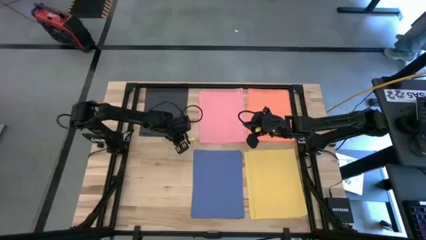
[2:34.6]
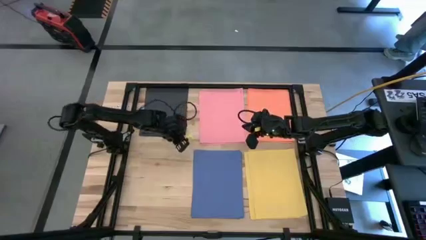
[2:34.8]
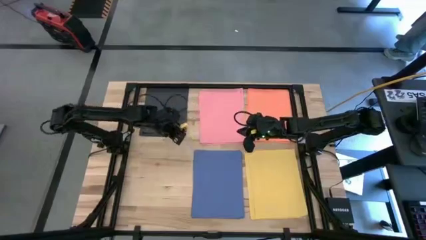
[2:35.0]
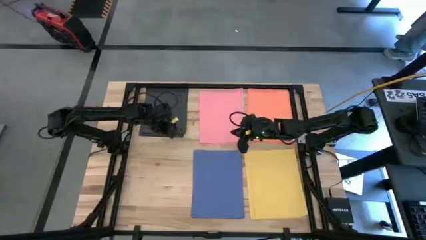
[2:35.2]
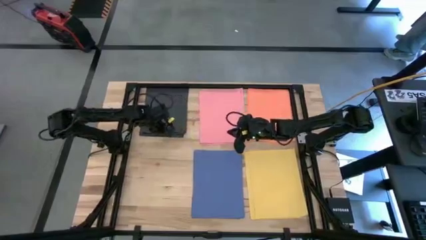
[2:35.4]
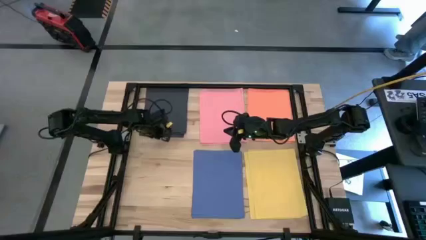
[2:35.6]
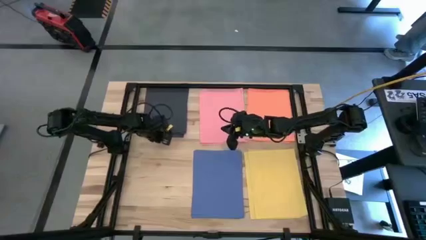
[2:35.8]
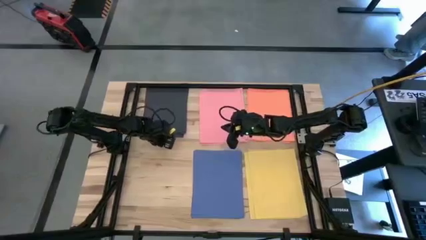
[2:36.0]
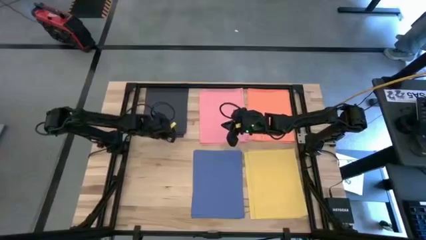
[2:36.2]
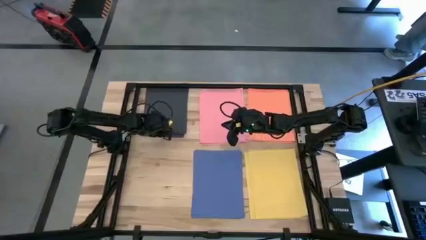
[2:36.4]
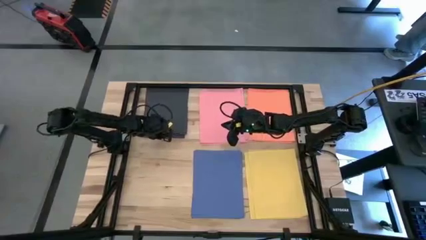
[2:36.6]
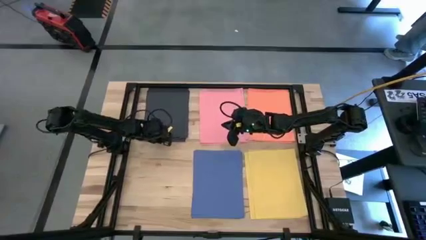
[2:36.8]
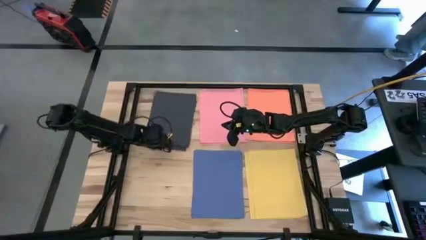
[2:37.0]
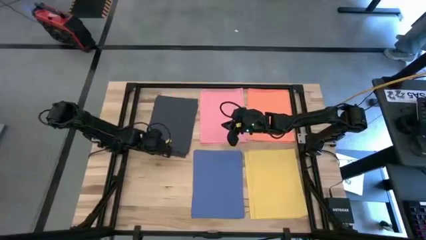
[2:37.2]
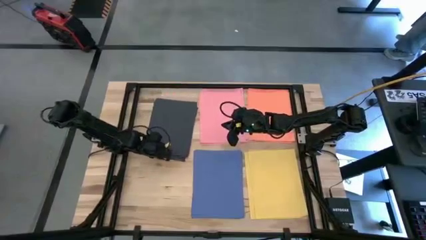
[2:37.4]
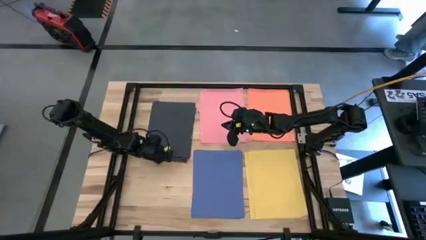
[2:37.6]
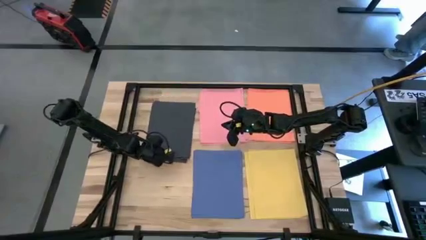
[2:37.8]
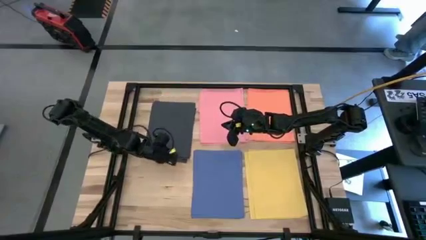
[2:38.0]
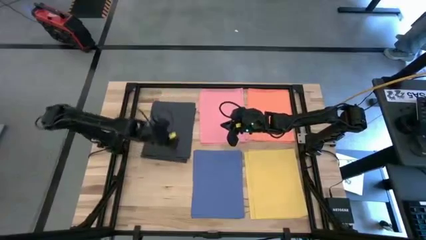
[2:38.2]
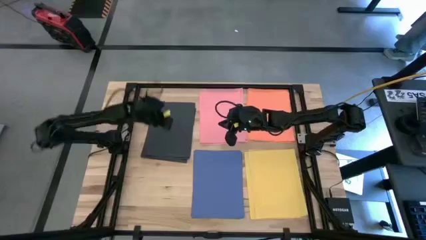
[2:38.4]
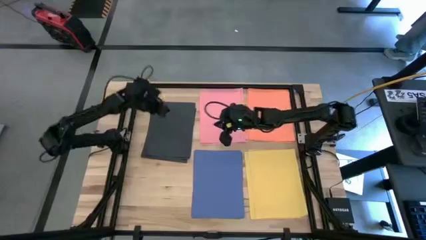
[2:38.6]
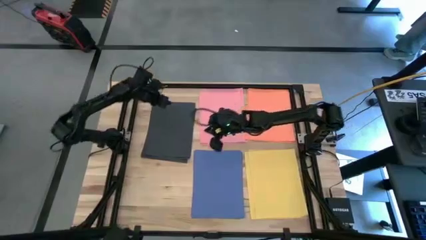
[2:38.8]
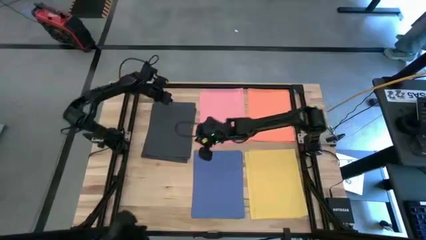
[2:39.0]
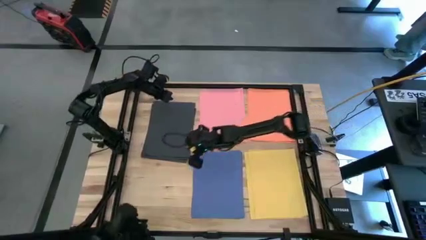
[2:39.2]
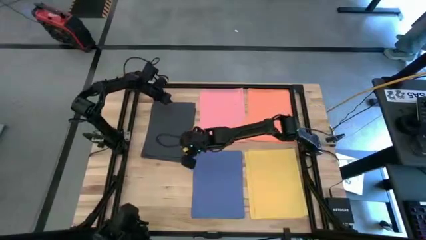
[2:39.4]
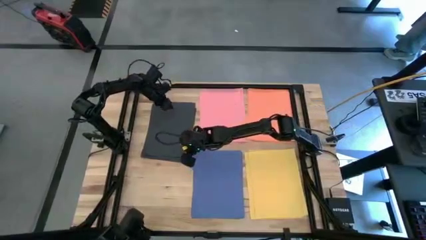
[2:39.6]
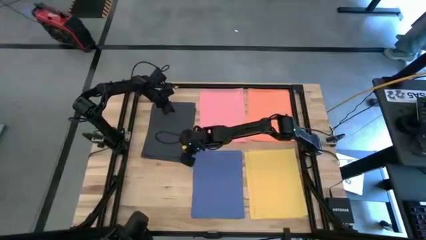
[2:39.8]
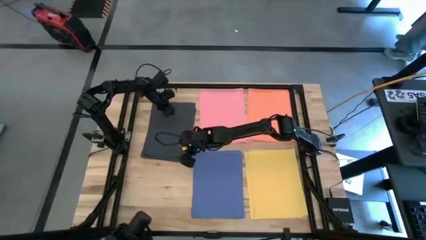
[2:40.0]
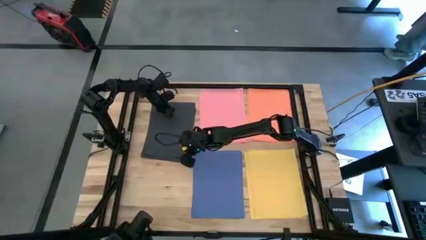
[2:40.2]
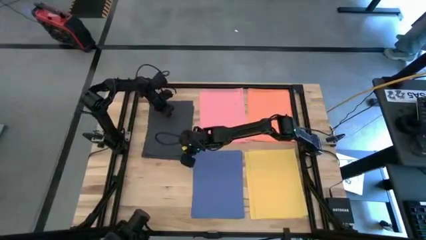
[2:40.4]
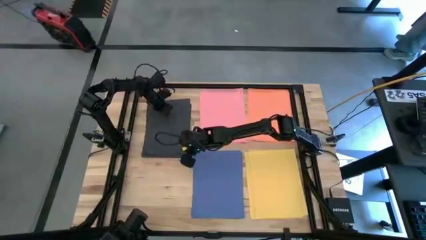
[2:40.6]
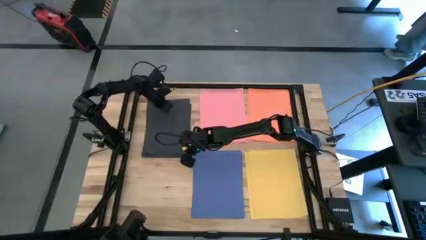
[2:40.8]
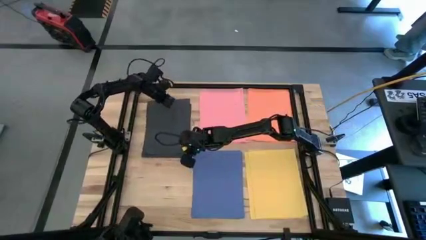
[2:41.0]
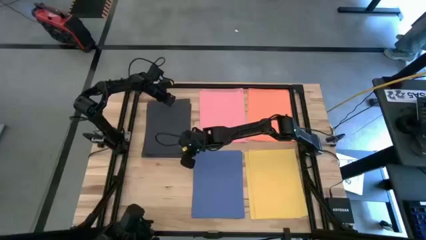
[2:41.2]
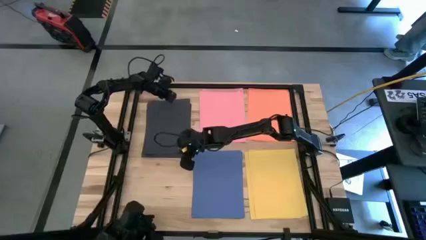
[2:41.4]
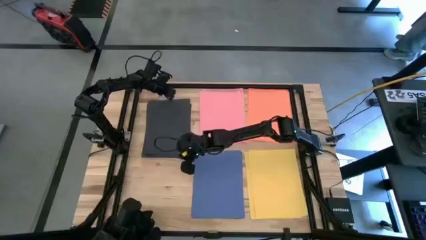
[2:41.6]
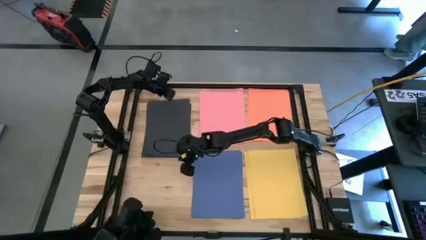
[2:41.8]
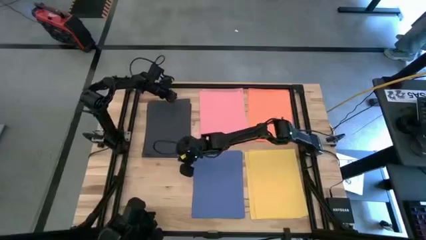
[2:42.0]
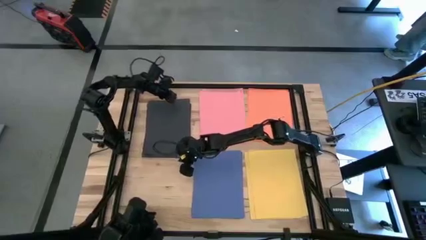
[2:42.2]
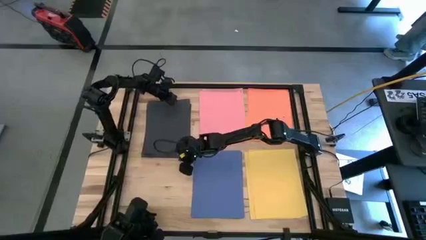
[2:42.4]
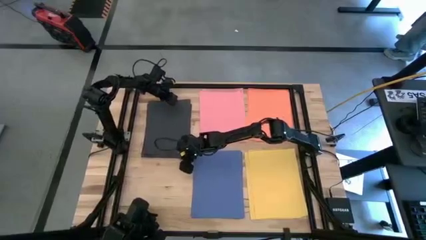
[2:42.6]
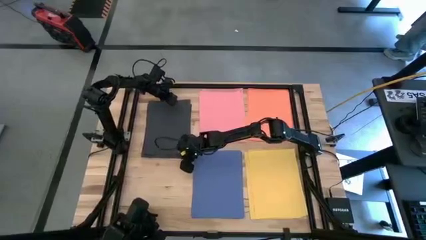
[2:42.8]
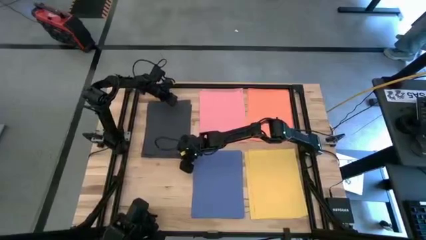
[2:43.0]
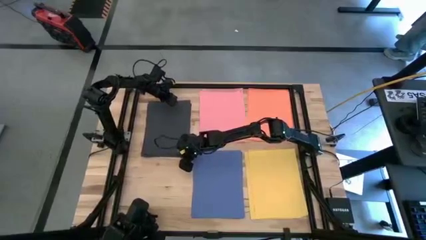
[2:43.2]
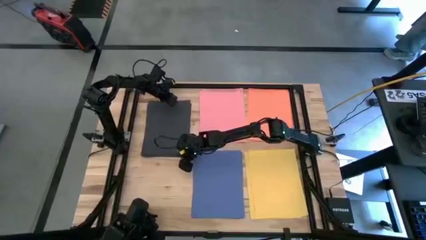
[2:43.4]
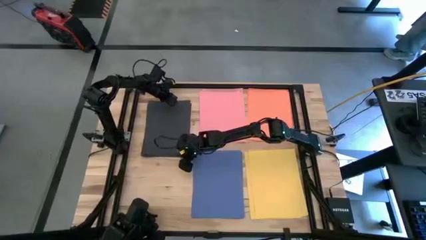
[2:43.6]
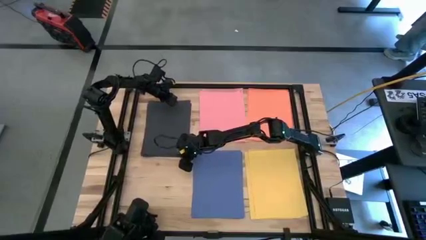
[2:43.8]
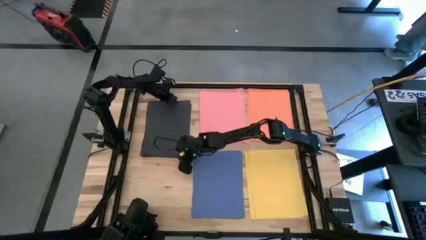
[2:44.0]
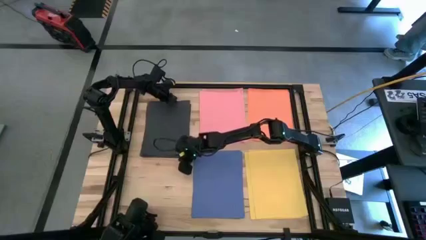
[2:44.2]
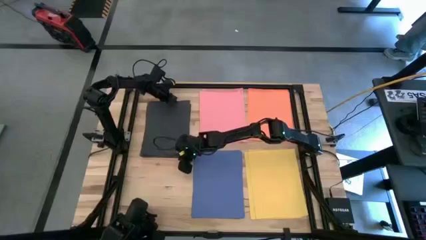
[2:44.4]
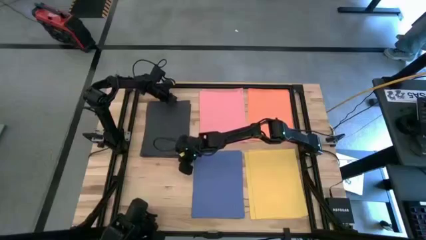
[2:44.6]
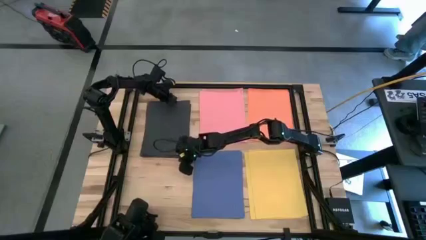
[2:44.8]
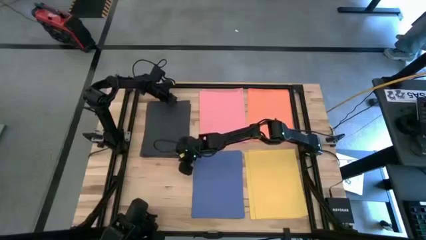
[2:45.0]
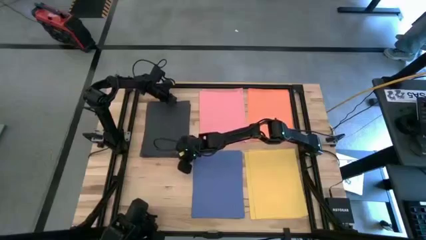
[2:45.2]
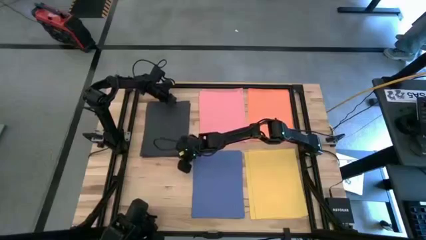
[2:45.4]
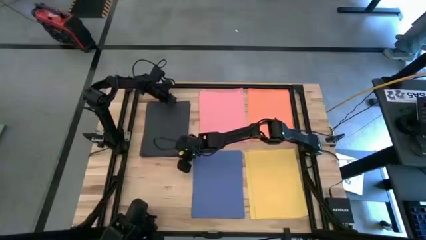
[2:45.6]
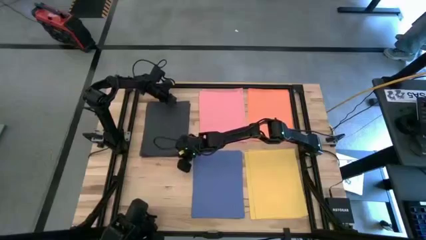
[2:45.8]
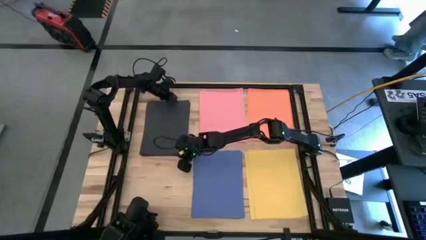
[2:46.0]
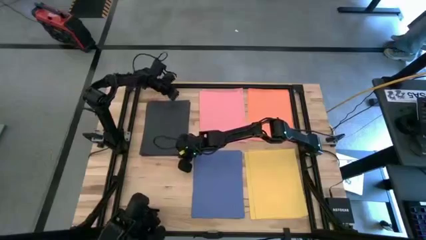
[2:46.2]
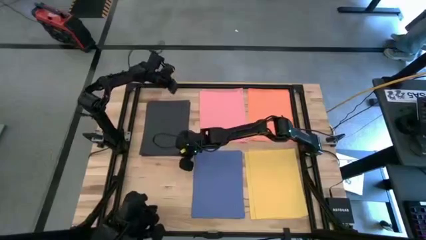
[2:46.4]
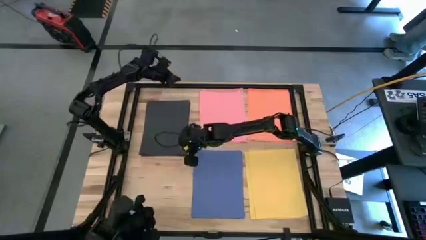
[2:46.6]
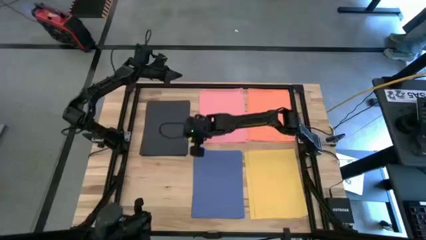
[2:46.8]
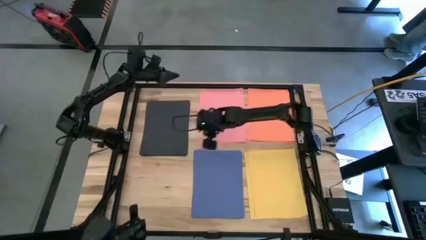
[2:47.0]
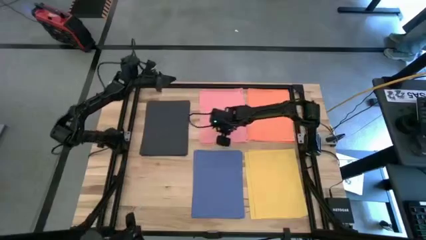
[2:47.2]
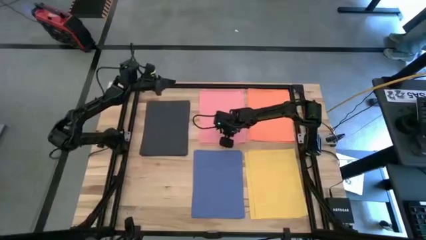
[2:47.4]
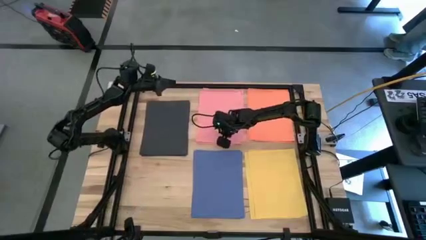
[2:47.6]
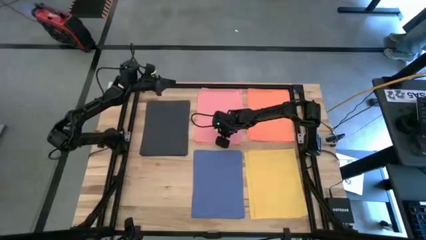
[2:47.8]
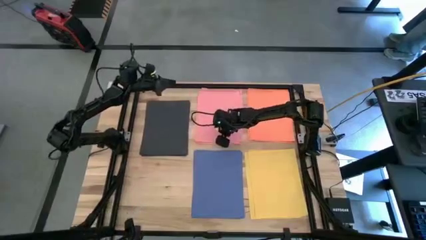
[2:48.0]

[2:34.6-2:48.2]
Task: Organize paper
Move all of the black paper at the upper left of the table

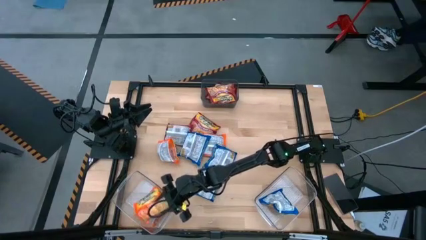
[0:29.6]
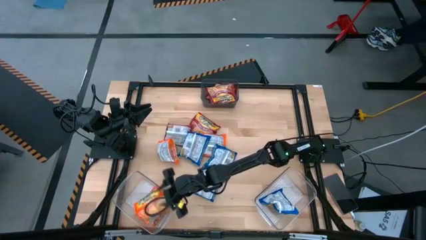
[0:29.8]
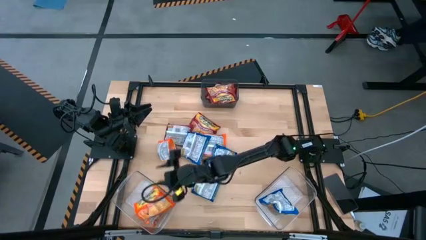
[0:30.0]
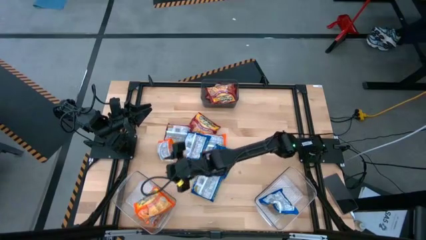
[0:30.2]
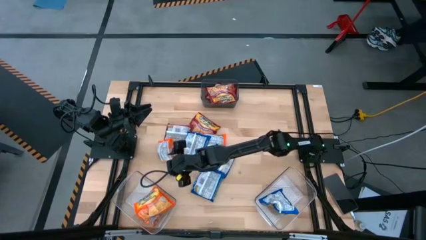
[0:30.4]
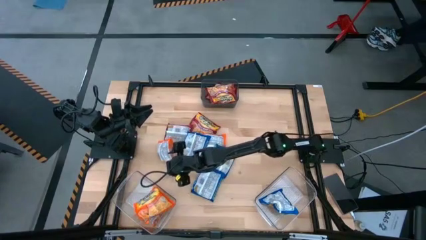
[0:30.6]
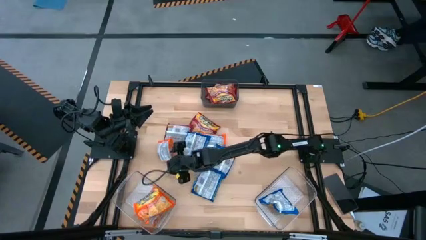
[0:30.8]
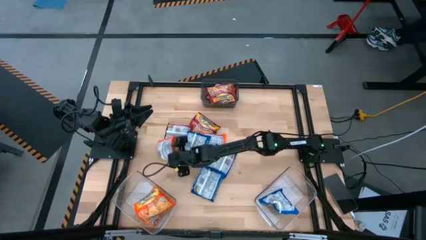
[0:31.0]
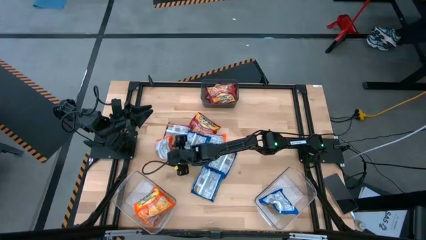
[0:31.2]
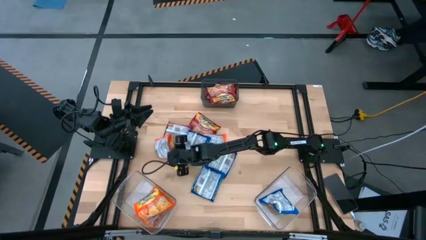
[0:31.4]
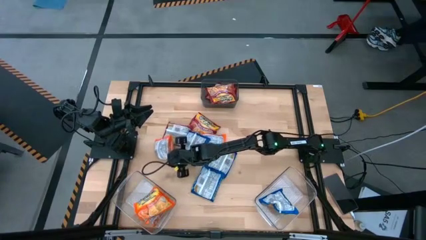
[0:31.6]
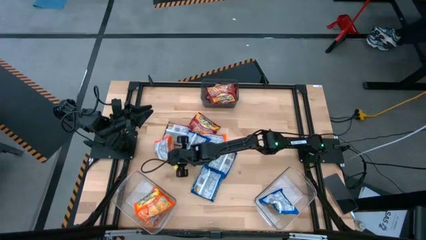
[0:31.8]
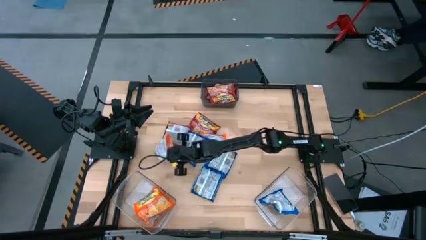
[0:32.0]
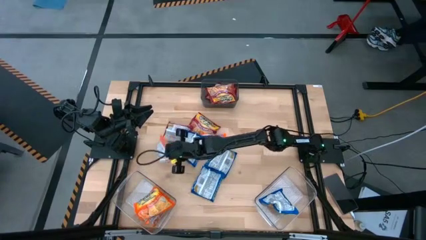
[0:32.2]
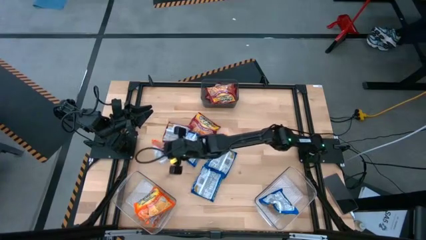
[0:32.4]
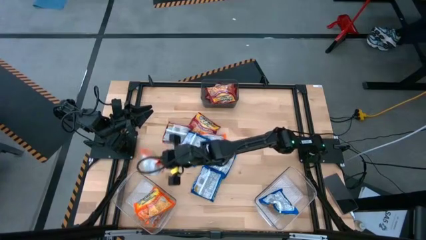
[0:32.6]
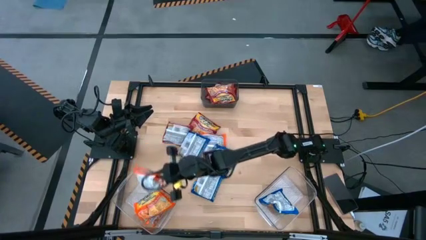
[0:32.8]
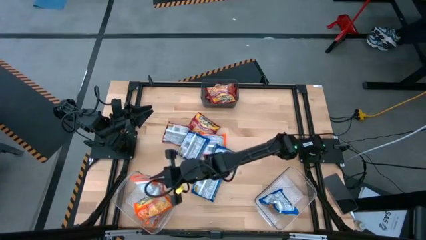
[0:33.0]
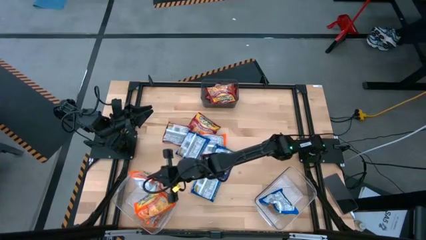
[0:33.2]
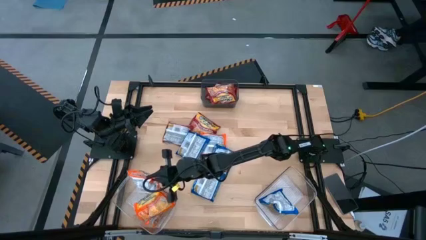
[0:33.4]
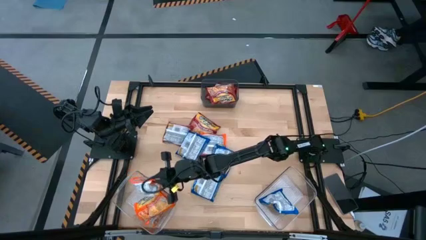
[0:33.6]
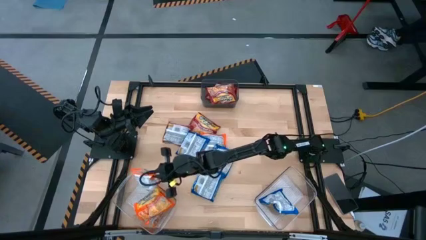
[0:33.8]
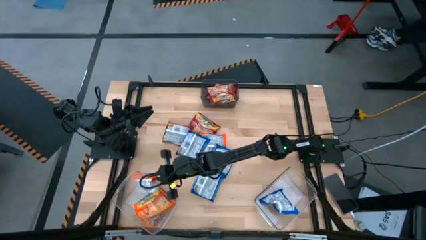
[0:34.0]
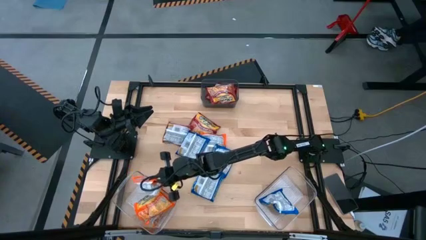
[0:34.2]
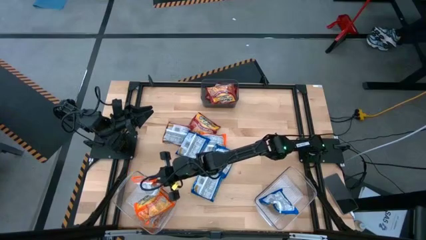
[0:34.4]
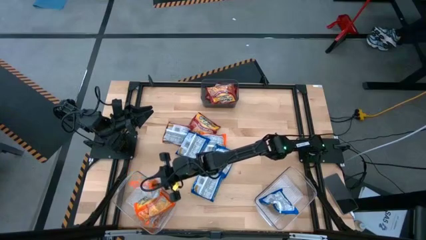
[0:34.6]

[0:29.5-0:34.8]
Task: Sort Maruchan noodles
Put the orange noodle pack into the left transparent bin
